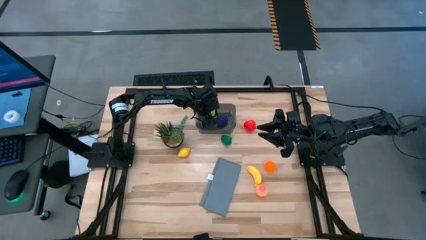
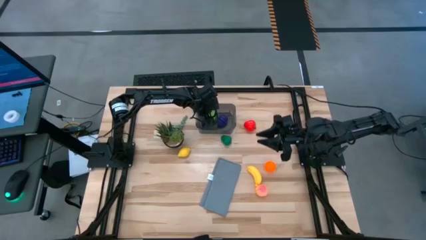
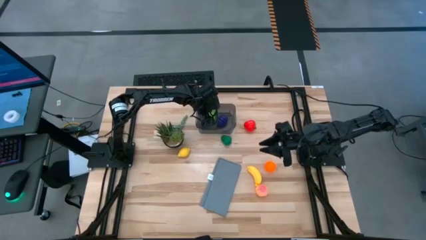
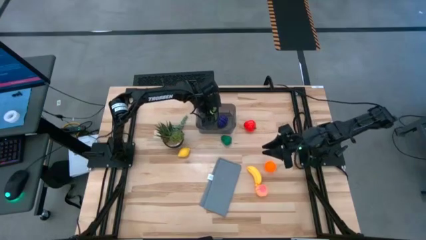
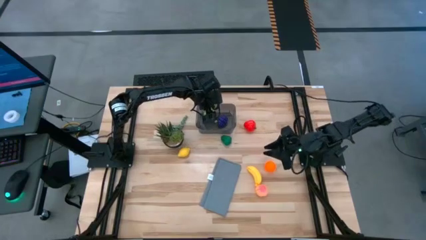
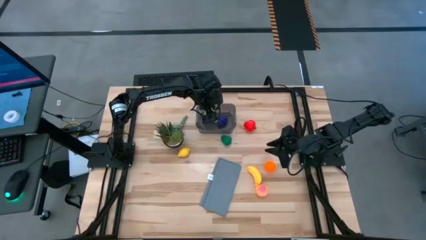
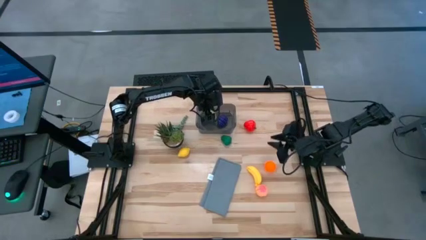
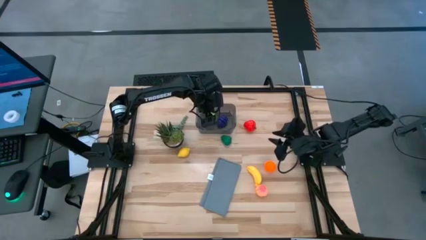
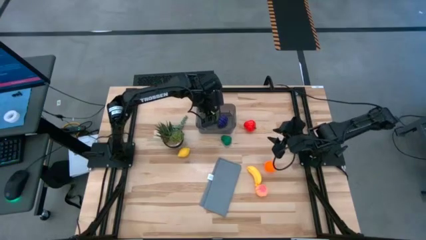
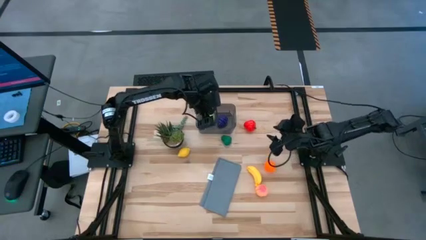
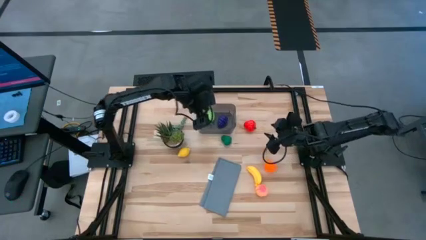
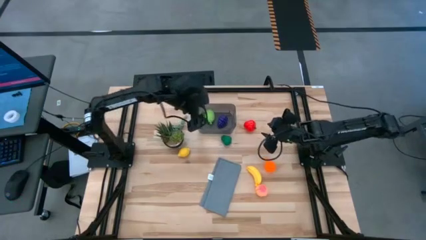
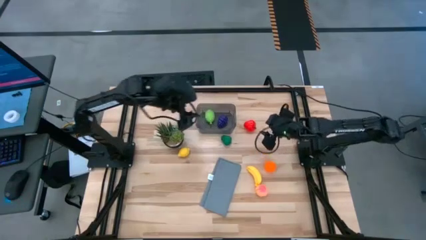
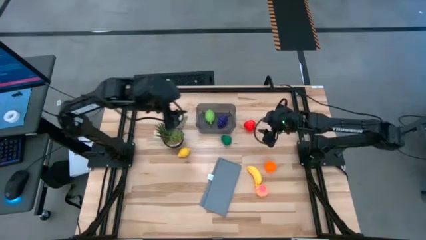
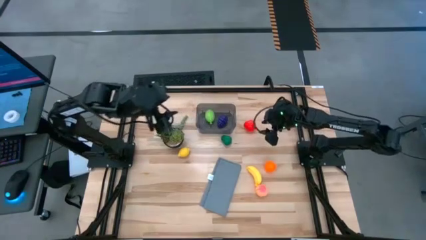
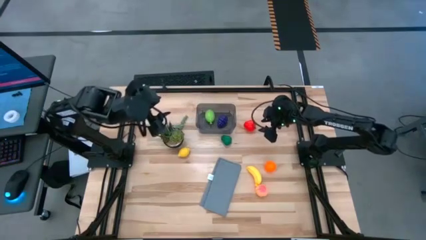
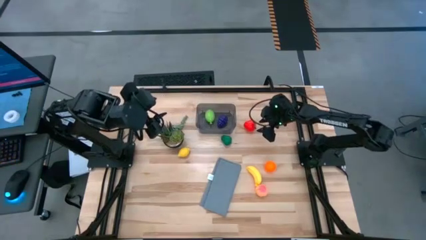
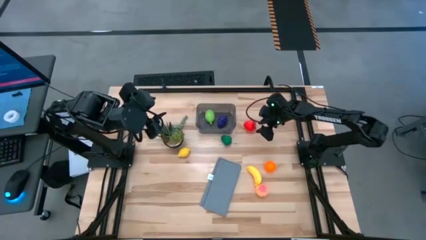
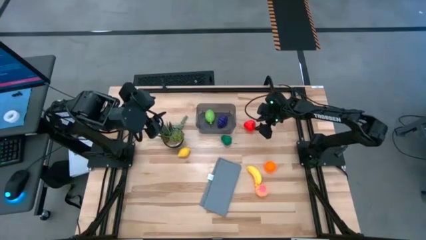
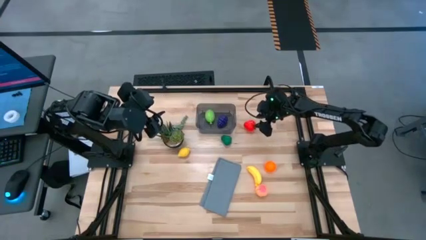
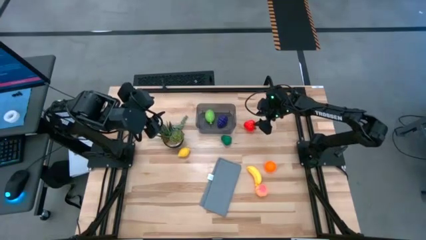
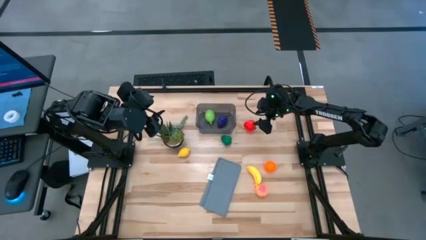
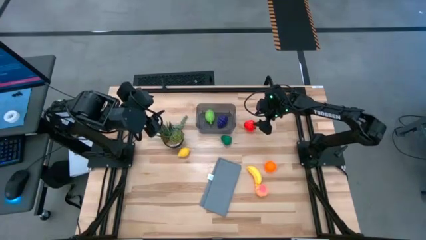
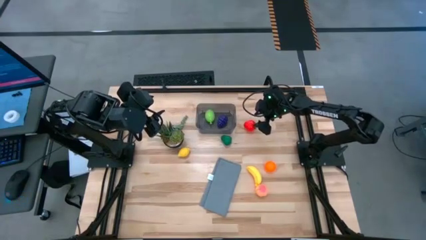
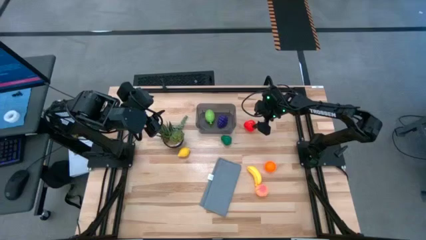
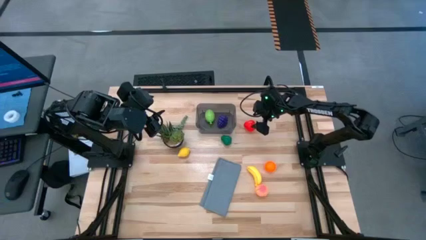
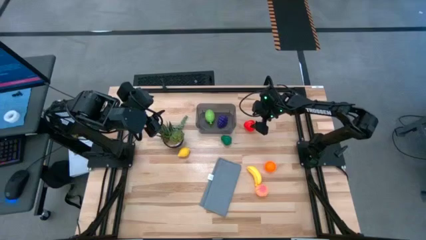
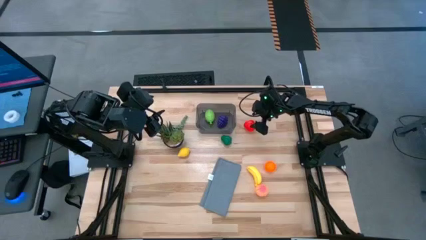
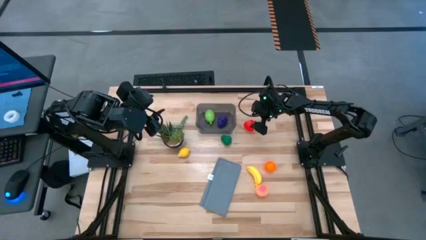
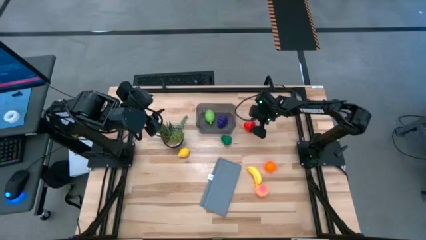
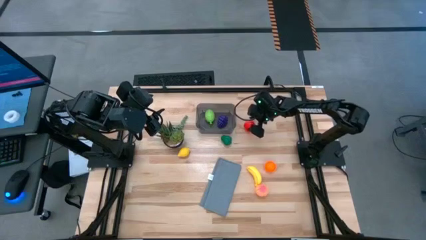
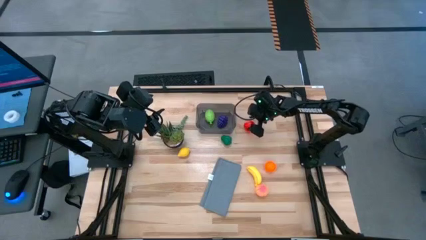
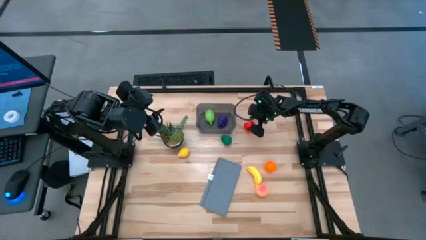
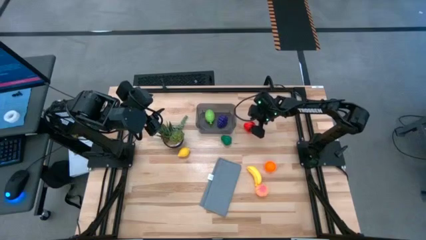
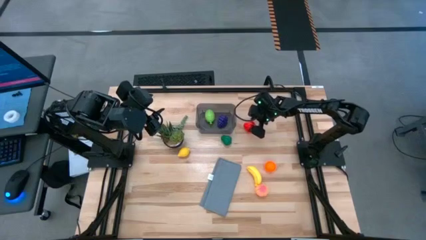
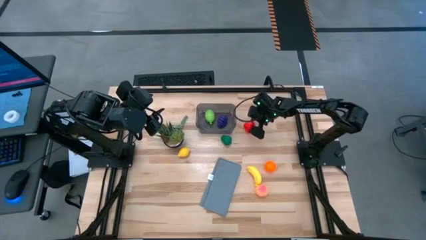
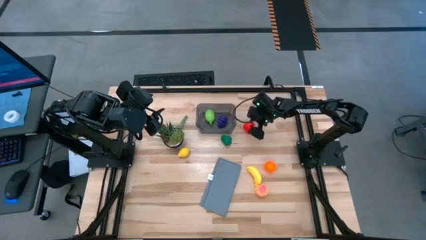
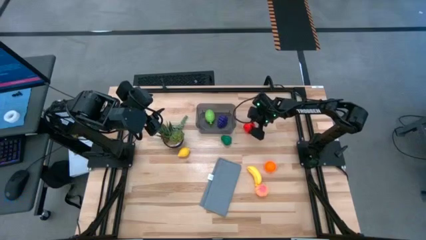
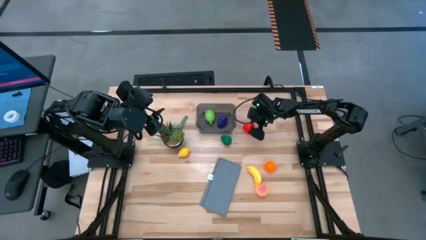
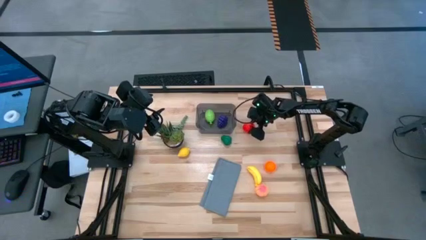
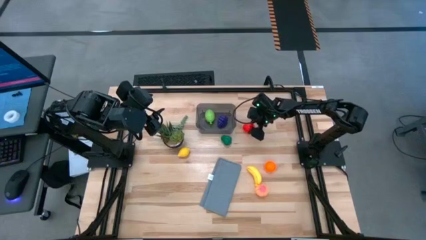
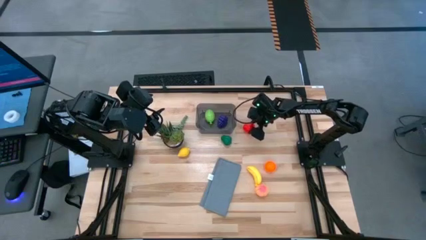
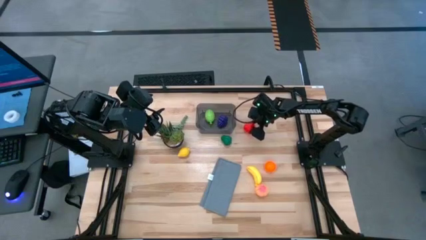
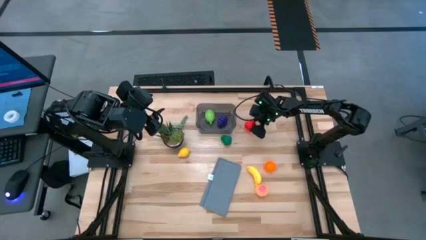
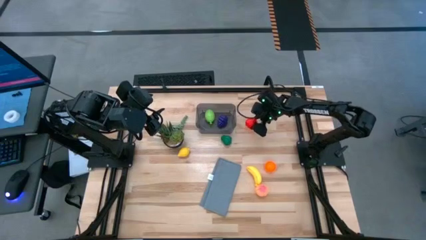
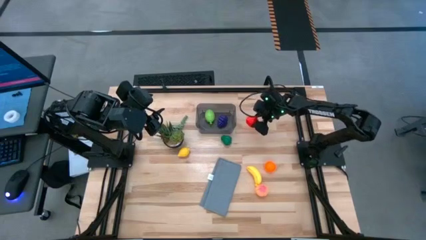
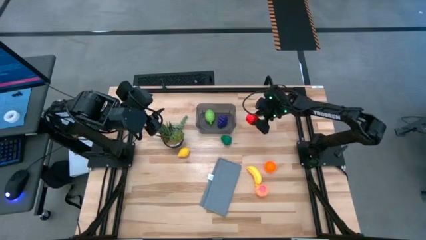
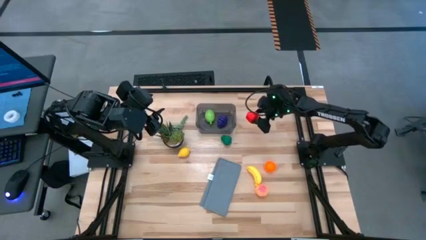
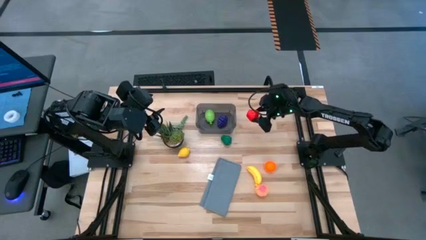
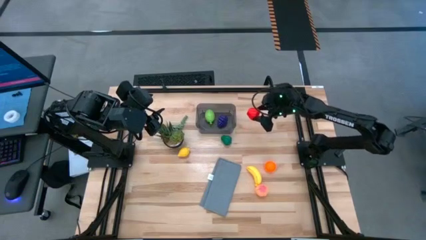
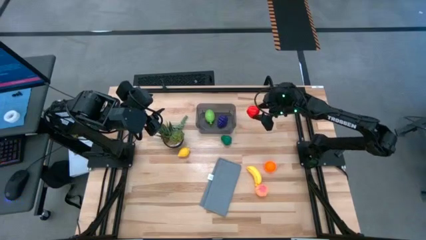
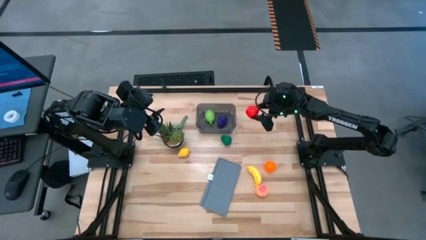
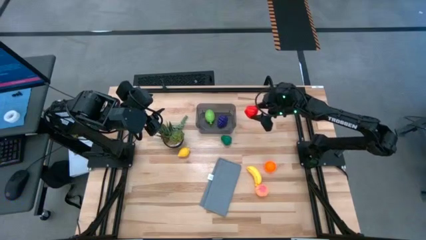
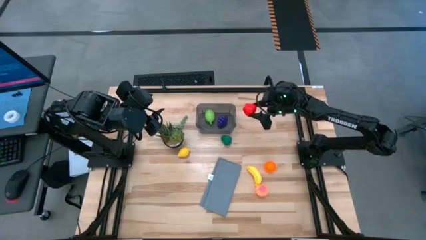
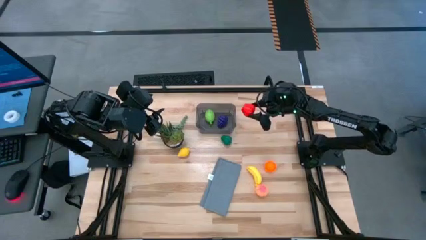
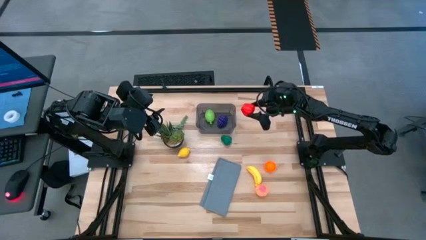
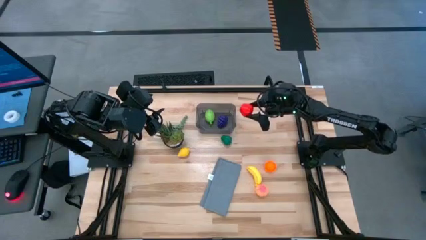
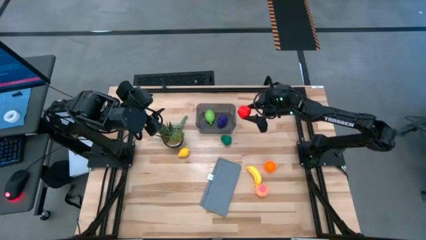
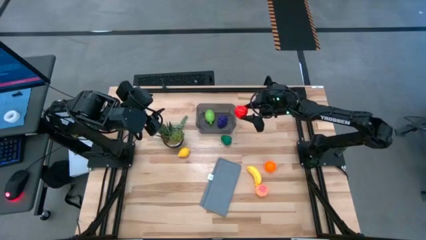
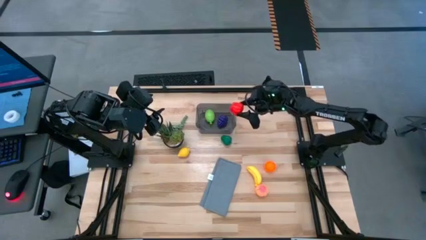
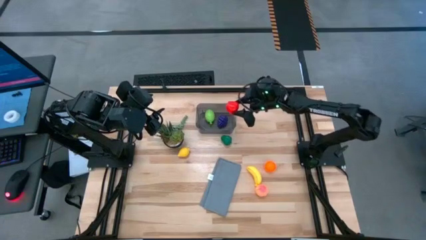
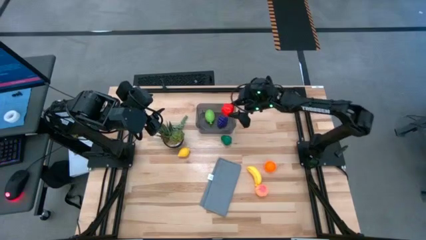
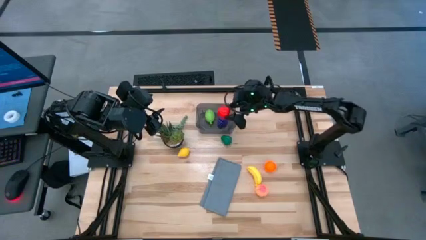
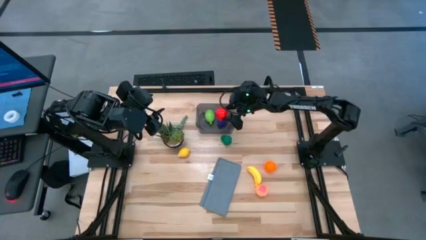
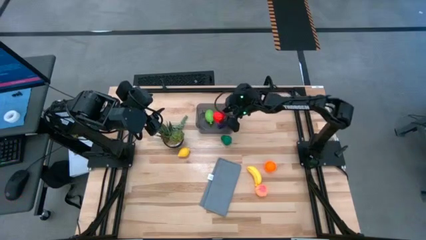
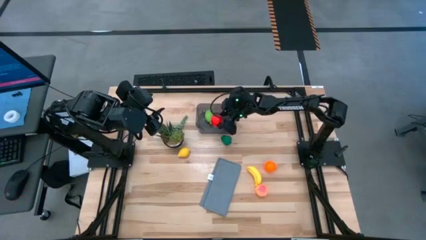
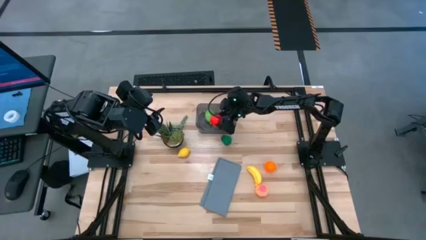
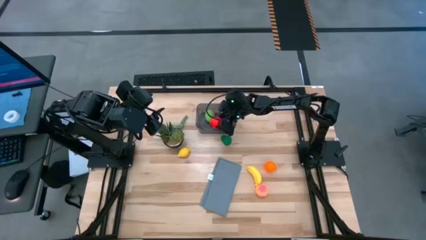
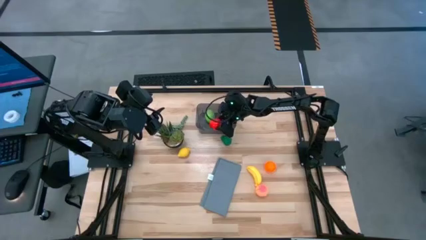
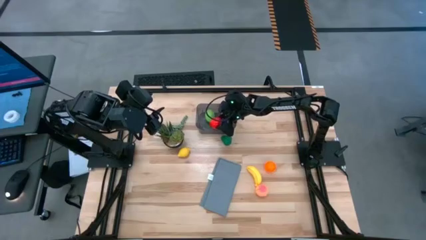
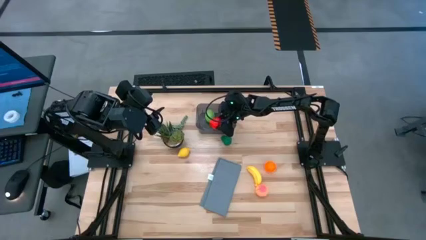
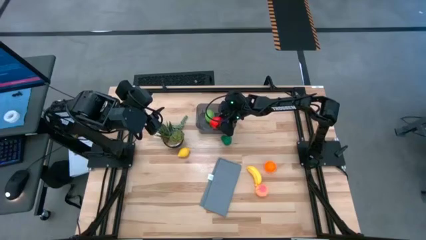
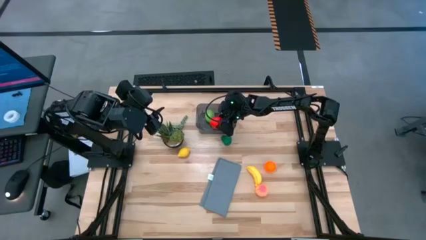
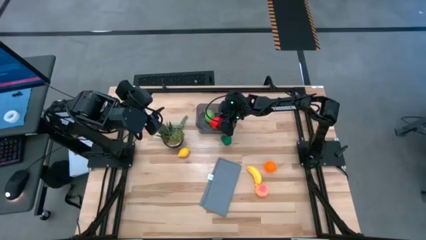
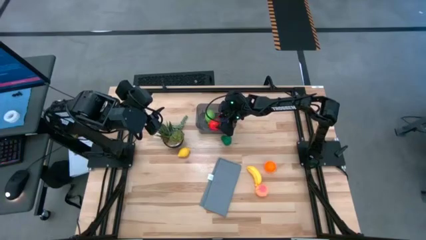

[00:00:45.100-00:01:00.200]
Task: Pick and placing Produce into tupperware
Put the apple into the black bin
